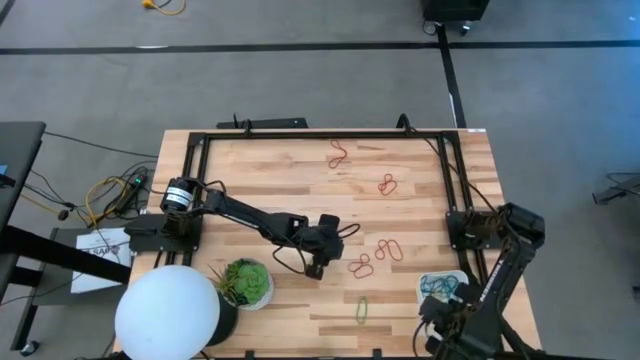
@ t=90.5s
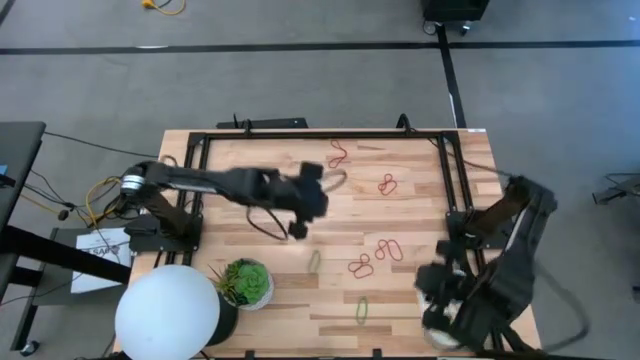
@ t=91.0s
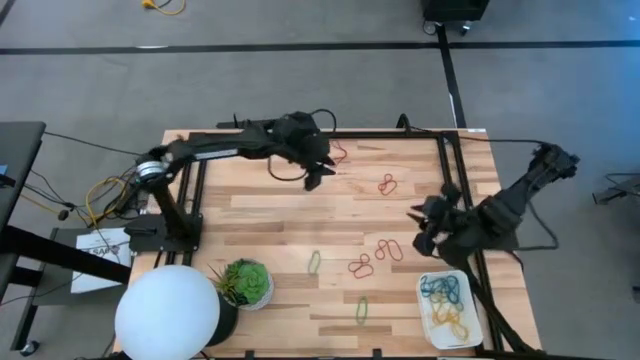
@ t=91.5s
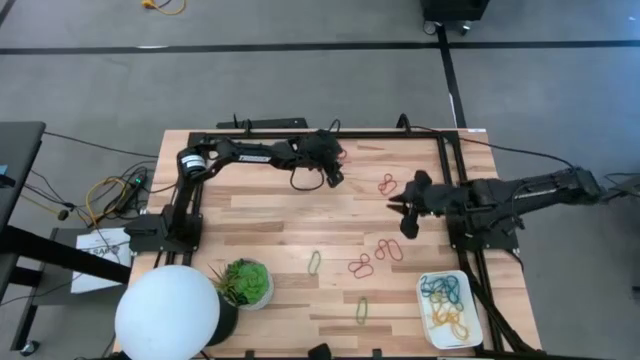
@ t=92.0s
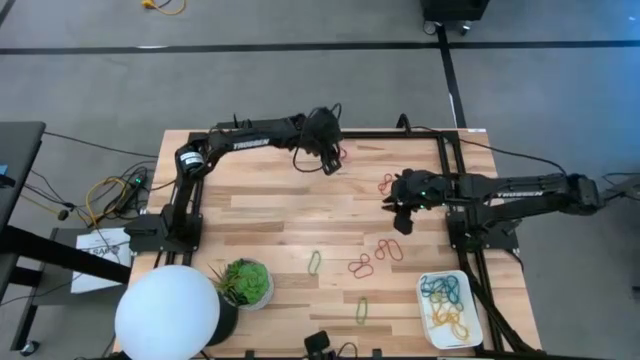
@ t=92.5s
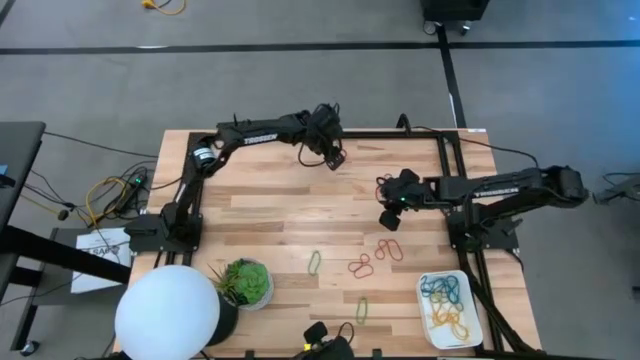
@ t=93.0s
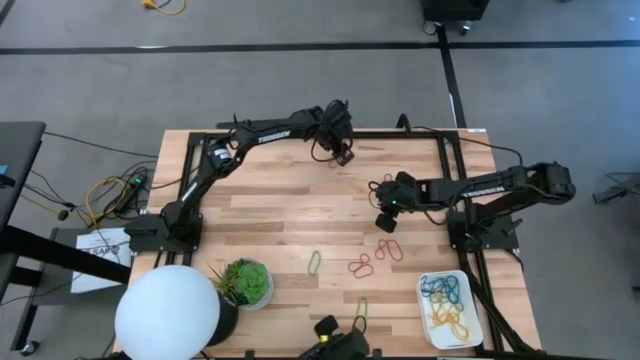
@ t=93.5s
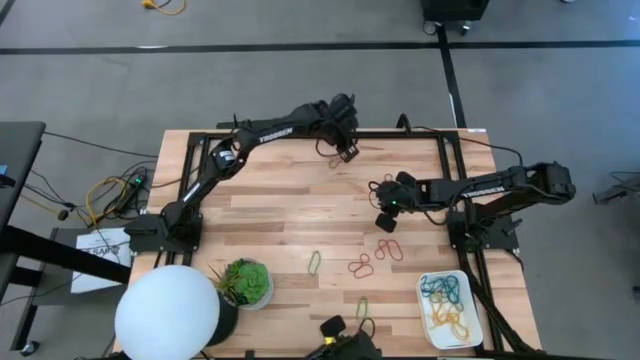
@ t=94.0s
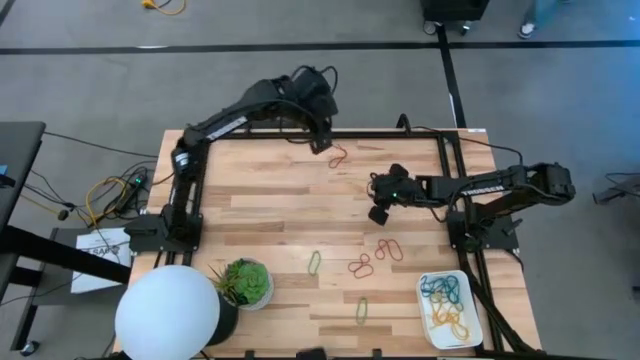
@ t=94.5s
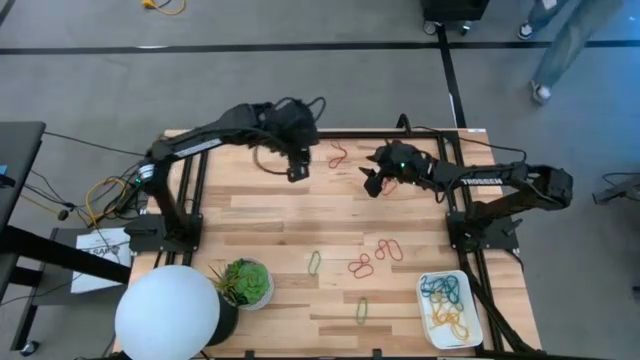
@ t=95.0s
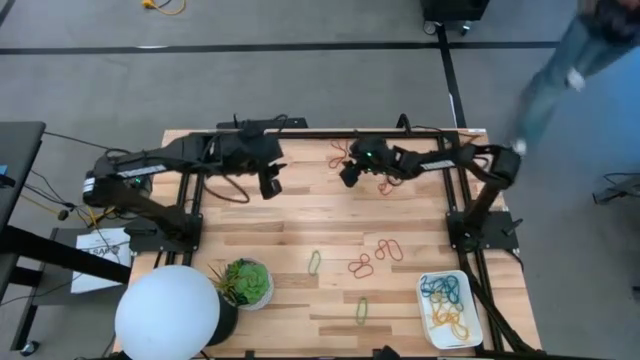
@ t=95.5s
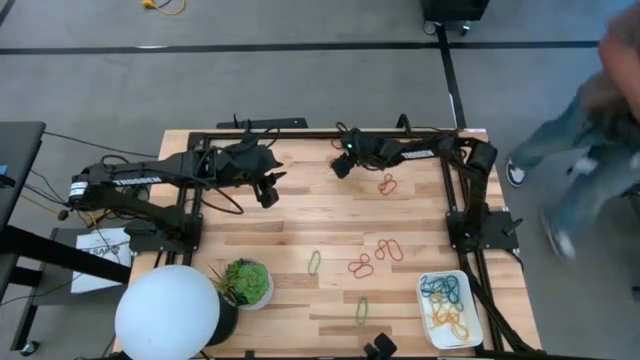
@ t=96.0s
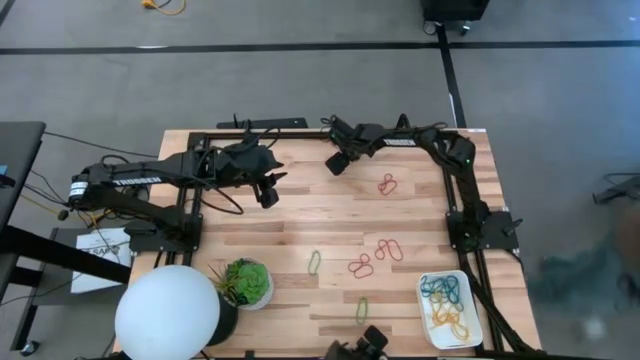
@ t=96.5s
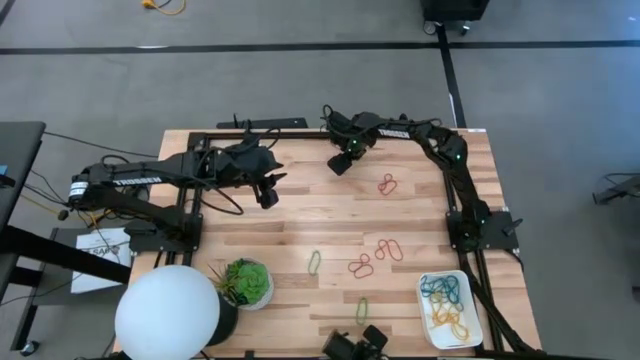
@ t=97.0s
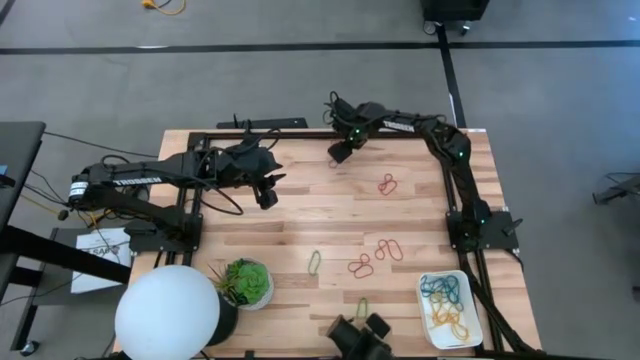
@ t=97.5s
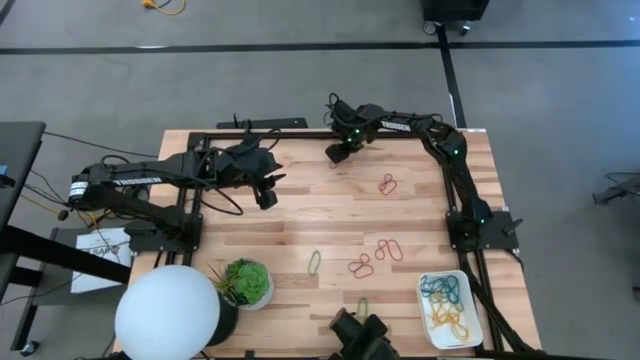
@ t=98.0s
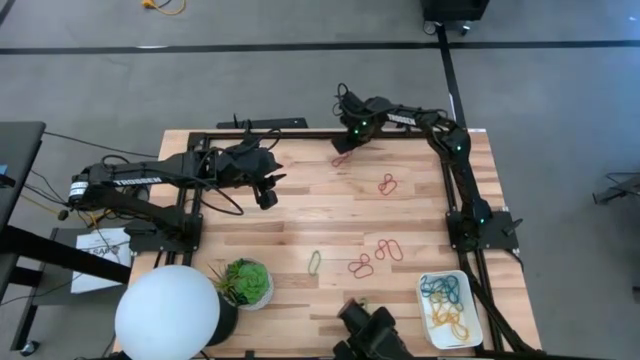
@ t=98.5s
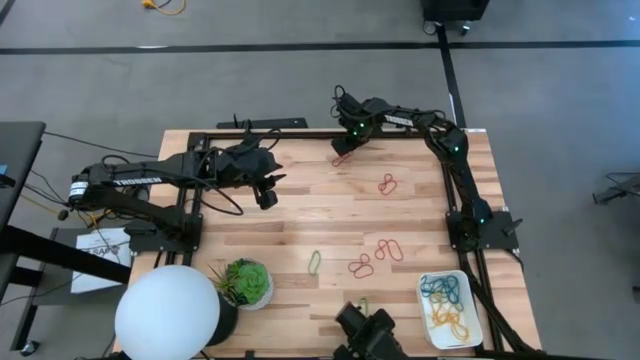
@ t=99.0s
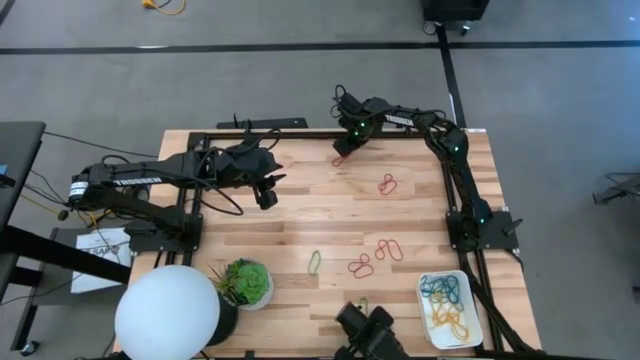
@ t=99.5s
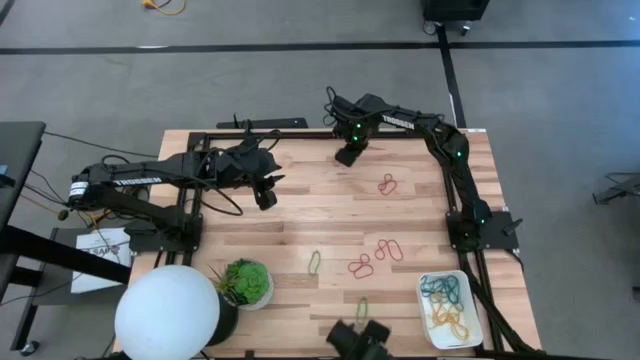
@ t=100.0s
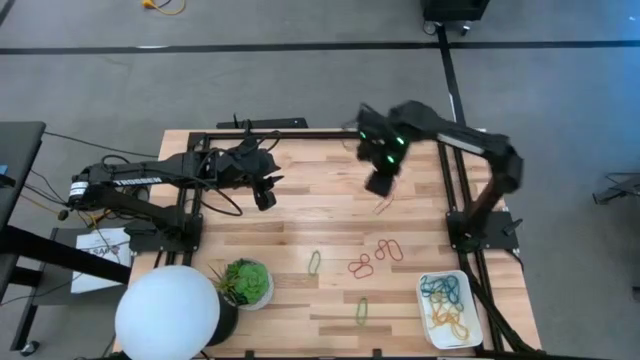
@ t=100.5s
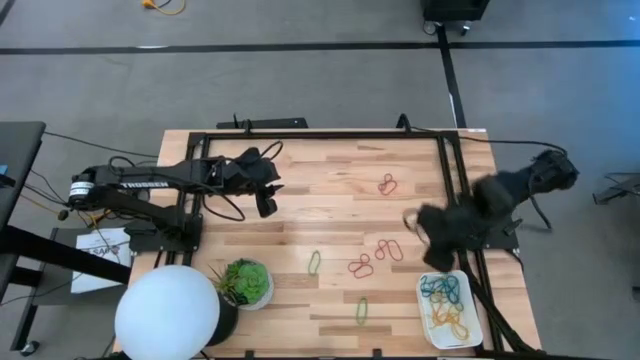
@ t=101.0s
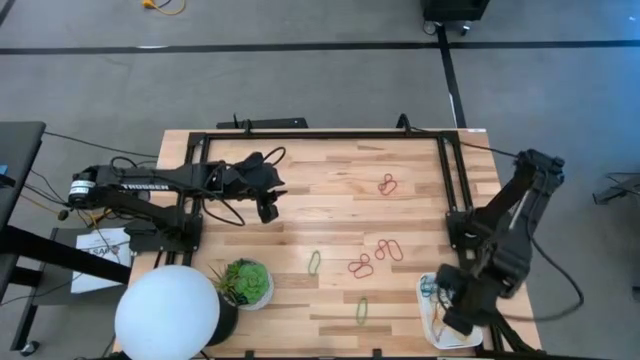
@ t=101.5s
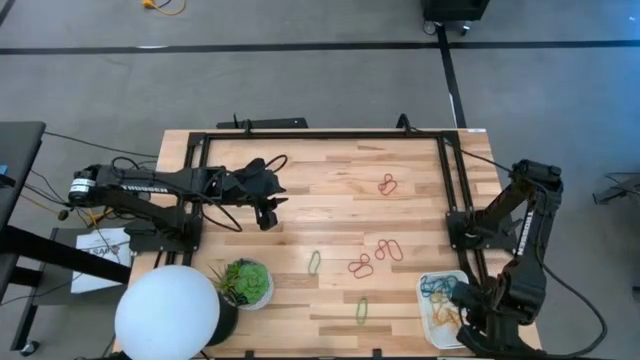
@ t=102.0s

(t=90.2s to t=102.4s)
Task: Pick and place items into bin
Put the red rubber band into the white bin

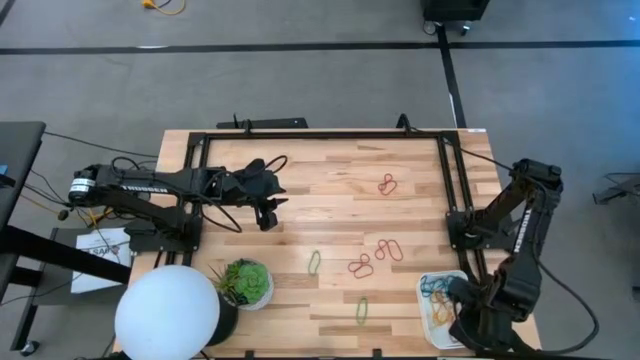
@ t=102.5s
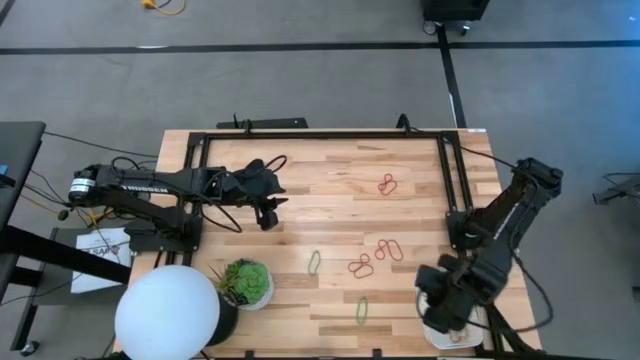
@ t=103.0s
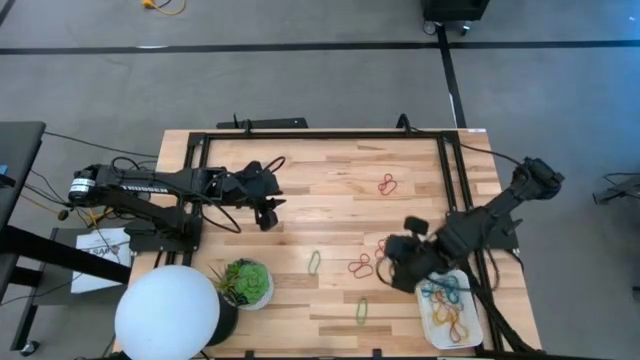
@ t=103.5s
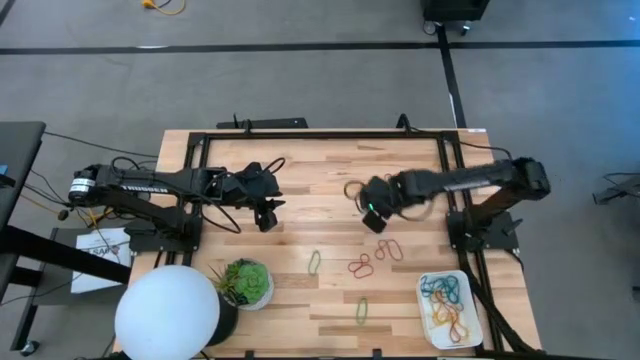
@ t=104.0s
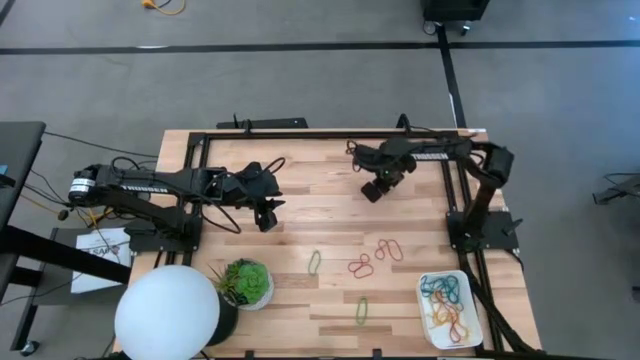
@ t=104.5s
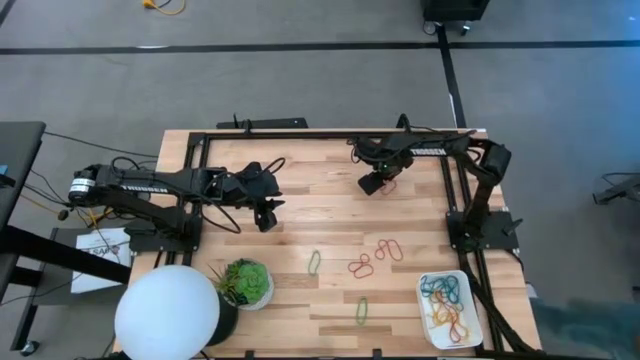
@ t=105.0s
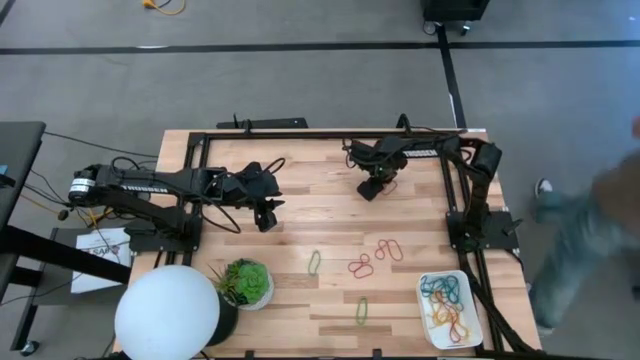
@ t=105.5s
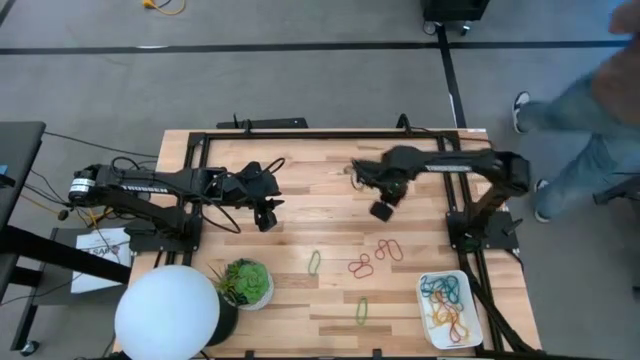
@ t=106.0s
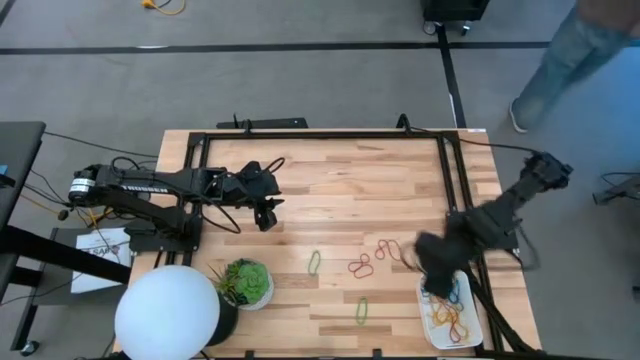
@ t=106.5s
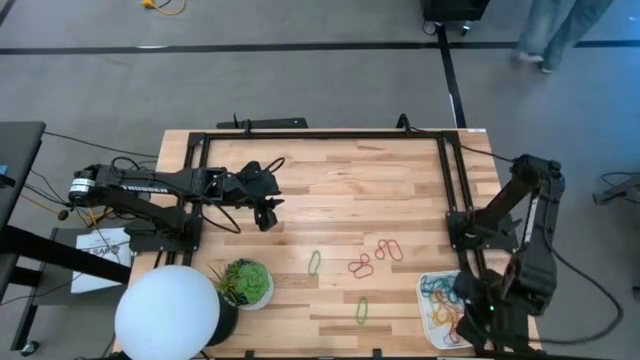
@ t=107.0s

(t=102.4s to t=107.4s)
Put the red rubber band into the white bin

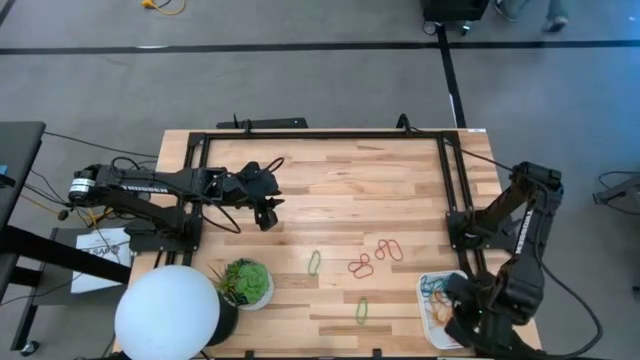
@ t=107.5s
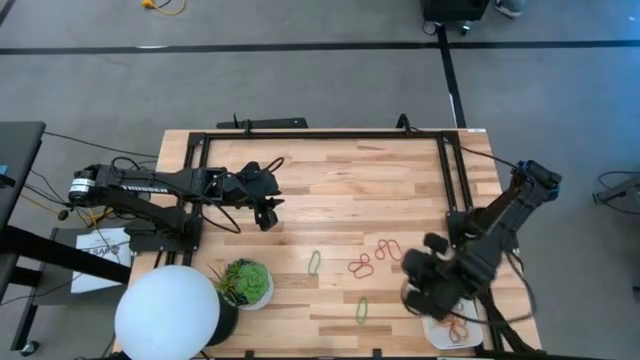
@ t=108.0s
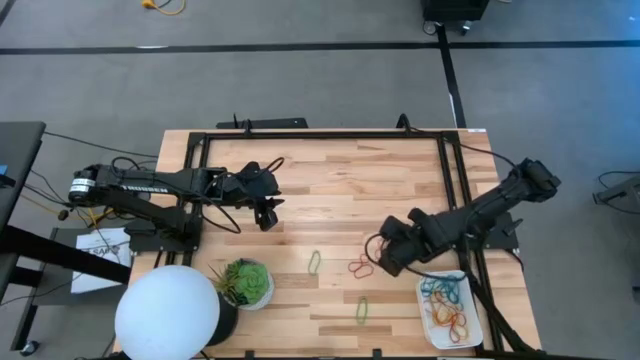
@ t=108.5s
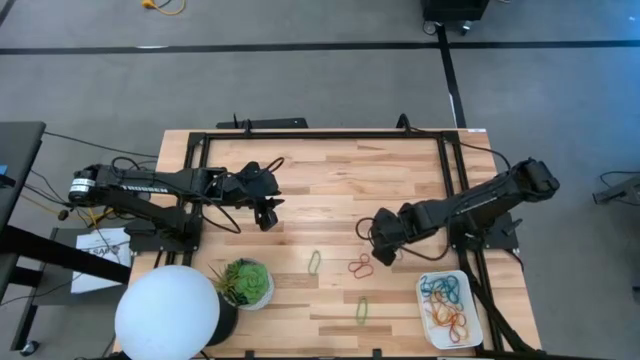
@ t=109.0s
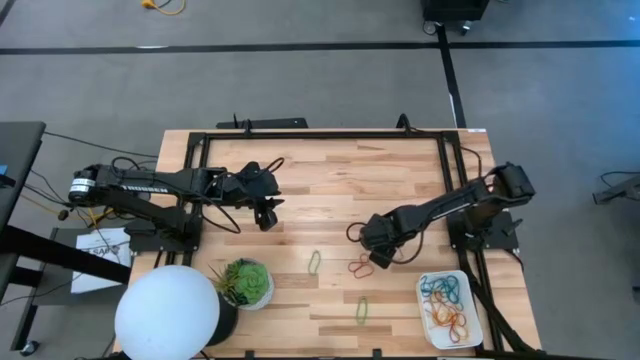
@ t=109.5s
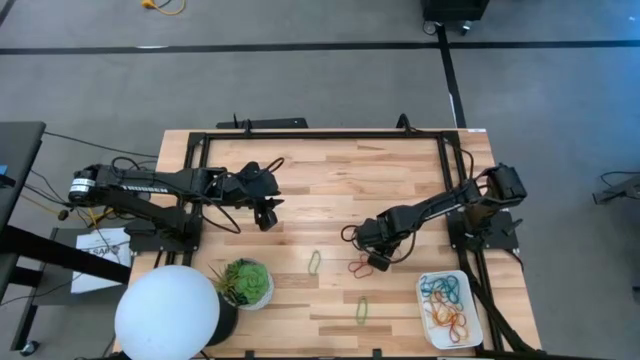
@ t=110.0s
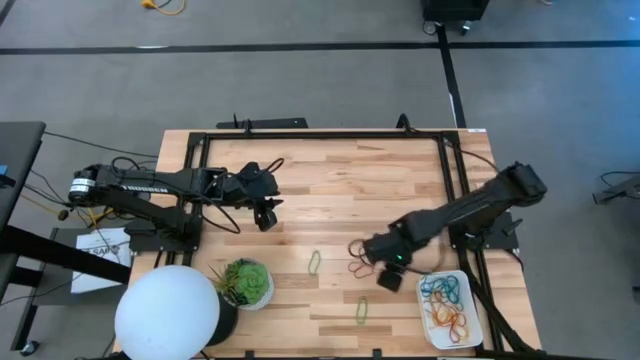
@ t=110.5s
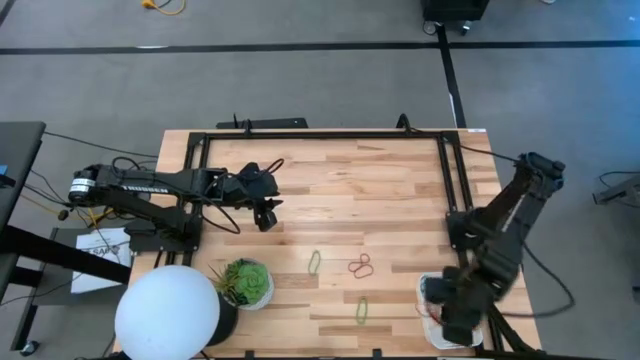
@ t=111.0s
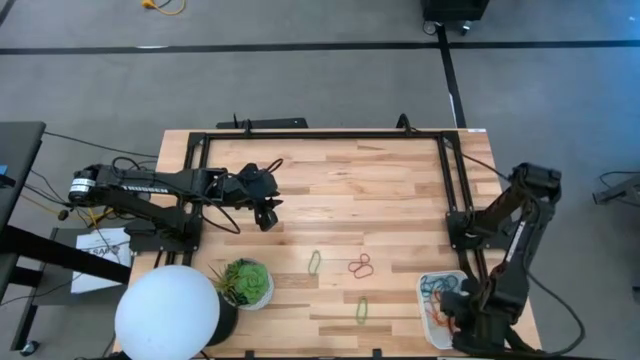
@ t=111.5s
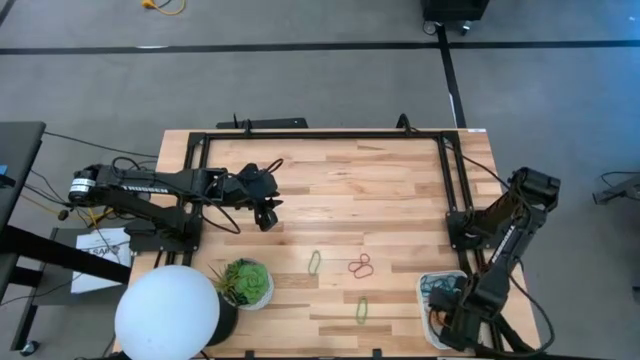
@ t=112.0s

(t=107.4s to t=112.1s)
Put the red rubber band into the white bin
